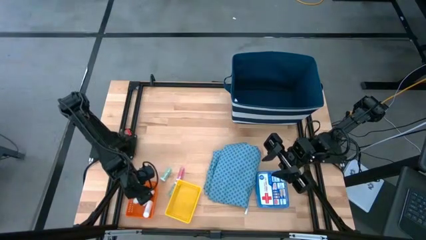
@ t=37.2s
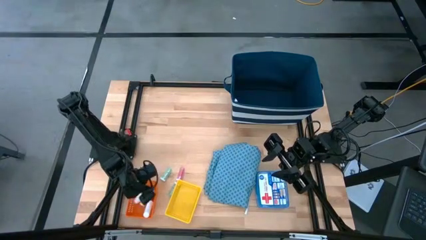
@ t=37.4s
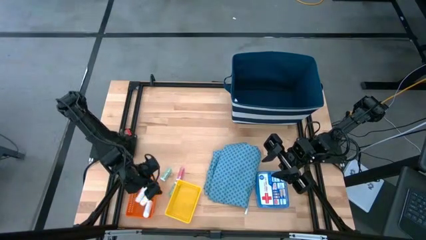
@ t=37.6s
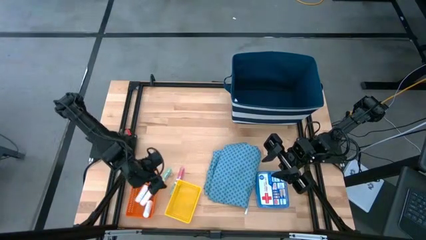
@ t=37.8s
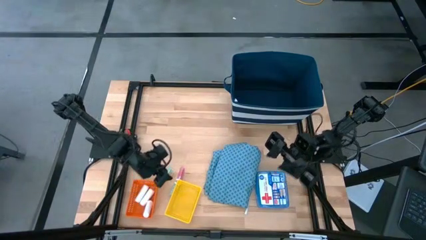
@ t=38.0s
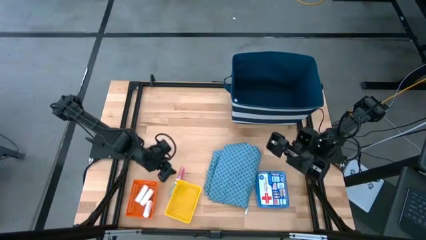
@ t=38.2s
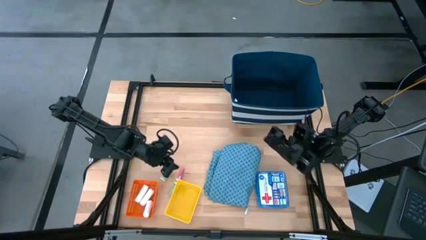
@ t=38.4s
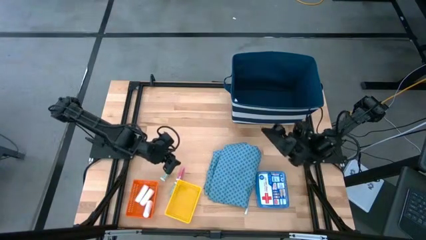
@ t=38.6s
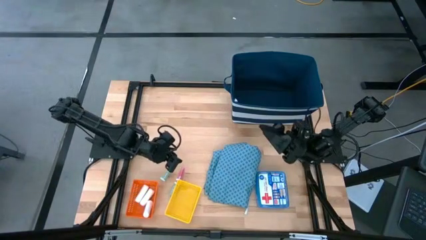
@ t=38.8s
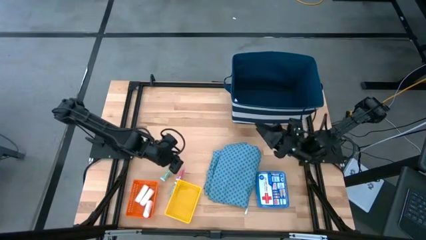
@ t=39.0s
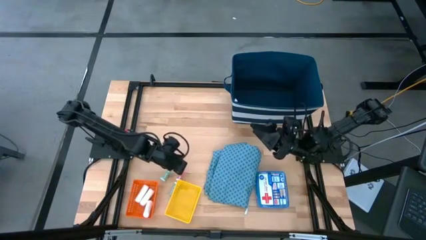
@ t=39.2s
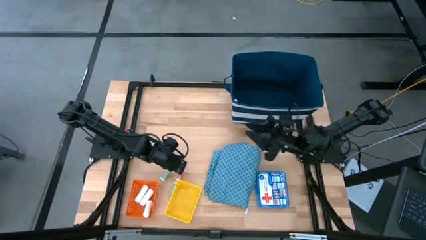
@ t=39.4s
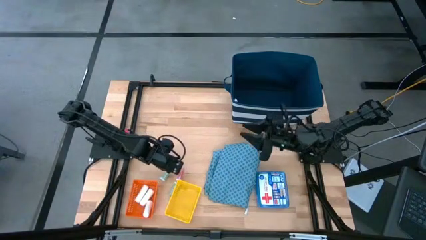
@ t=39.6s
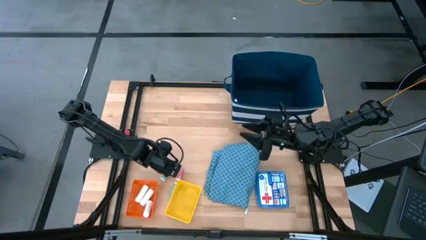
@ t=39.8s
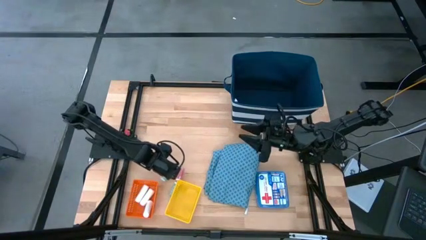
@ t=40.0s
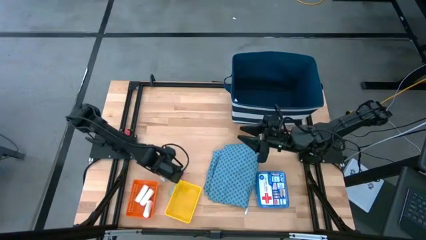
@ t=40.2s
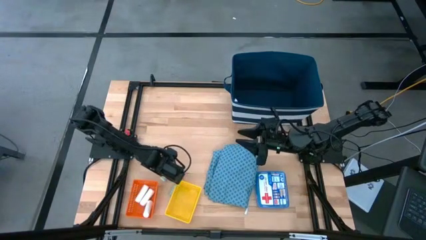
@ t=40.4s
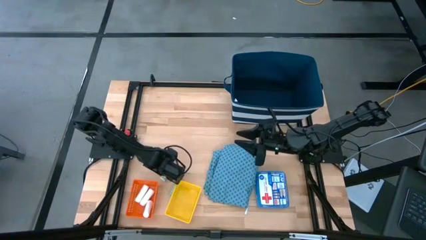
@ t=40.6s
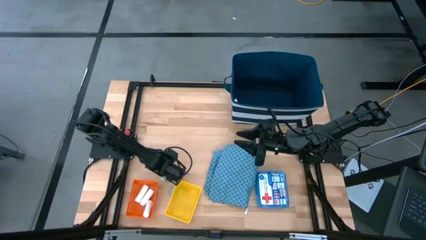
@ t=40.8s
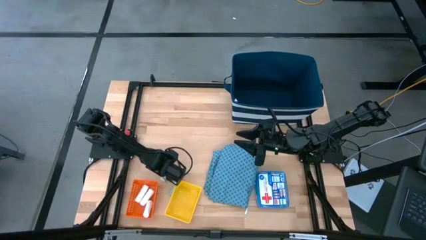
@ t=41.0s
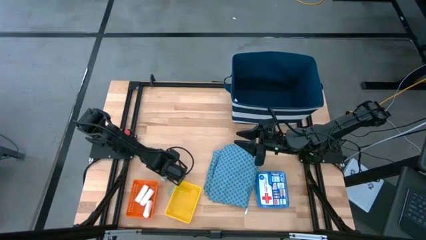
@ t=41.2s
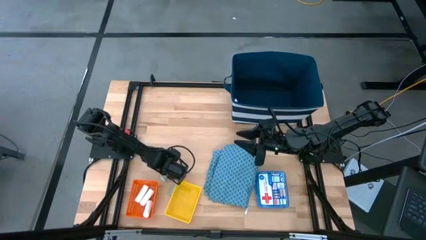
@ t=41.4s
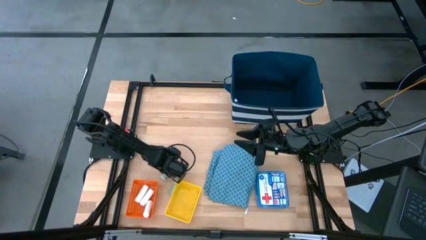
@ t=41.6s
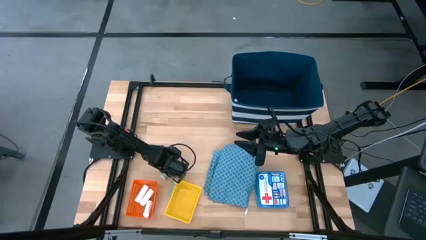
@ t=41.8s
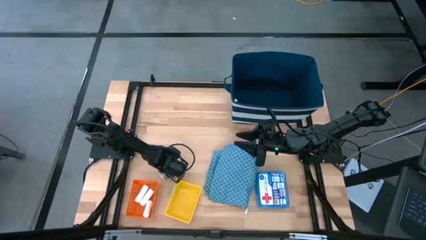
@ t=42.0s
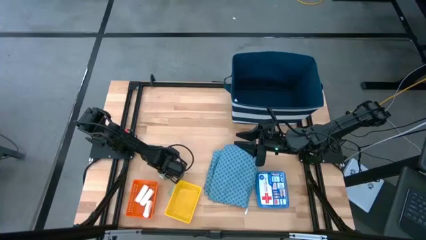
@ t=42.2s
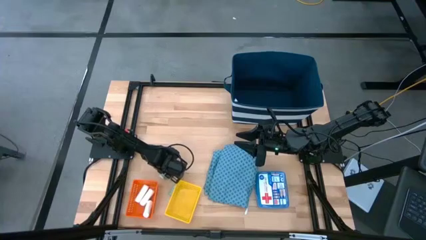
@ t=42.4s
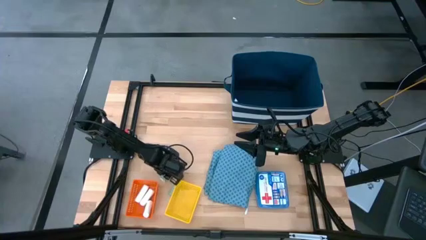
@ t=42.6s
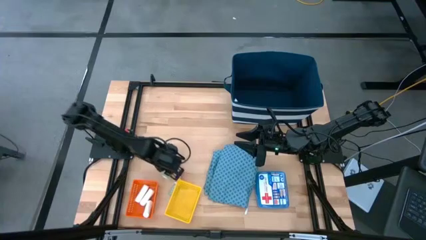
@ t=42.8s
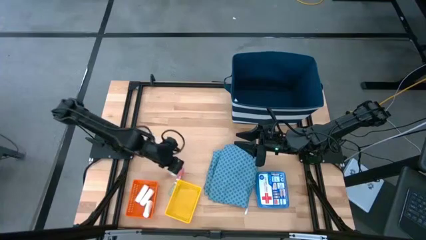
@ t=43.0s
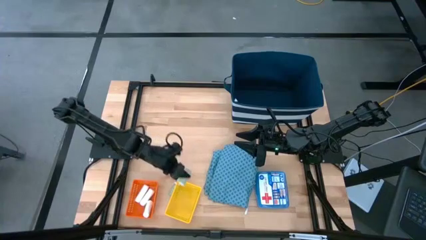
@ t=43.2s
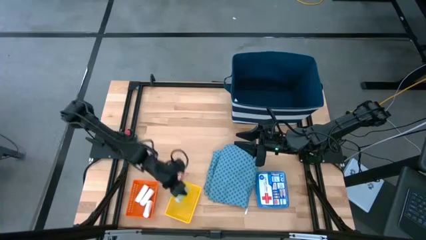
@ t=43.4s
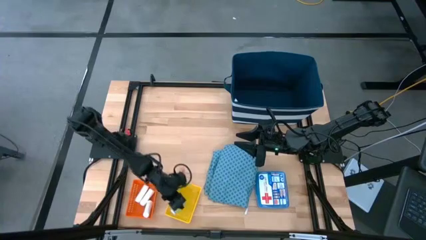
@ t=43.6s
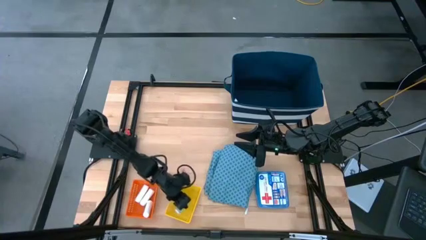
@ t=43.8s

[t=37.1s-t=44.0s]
Task: Pick & Place Medicine items
Put the left green medicine bottle into the yellow bin

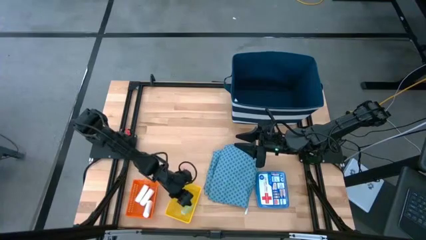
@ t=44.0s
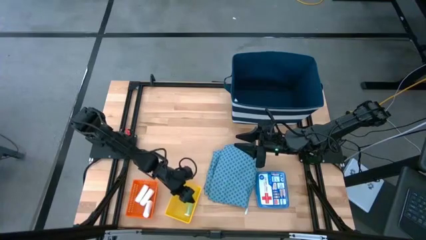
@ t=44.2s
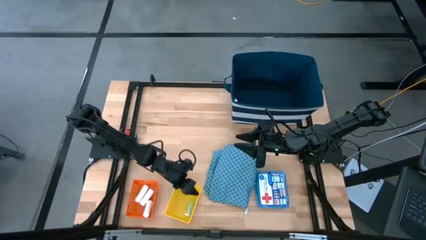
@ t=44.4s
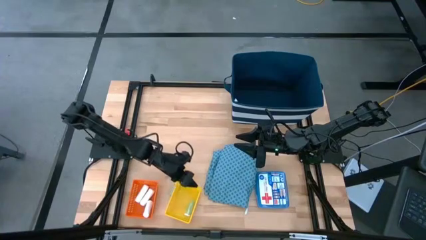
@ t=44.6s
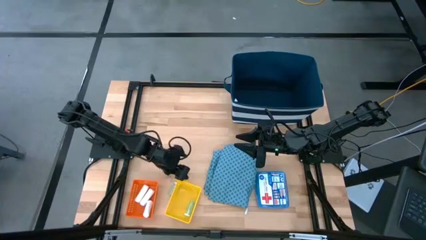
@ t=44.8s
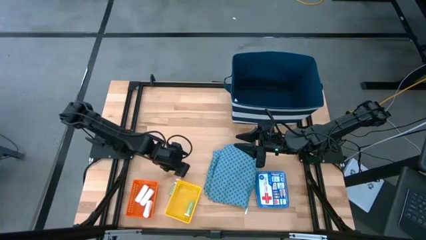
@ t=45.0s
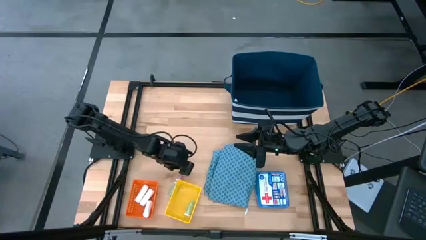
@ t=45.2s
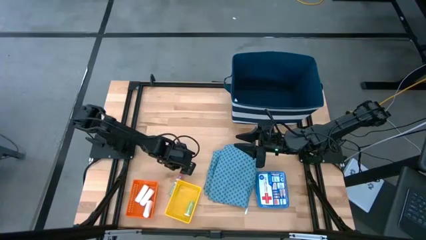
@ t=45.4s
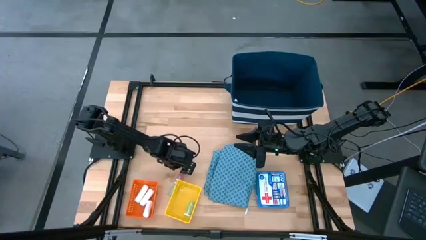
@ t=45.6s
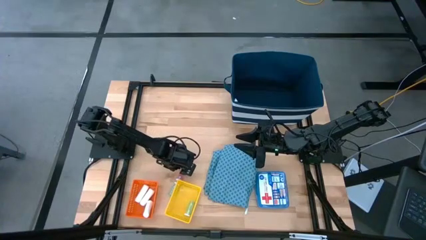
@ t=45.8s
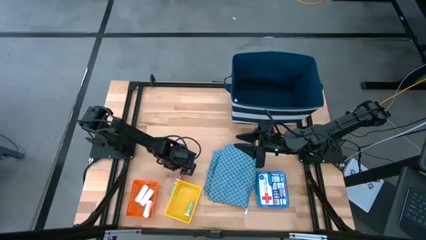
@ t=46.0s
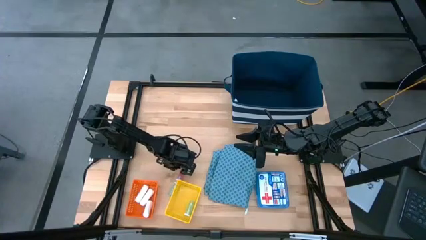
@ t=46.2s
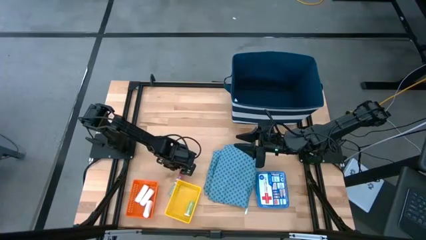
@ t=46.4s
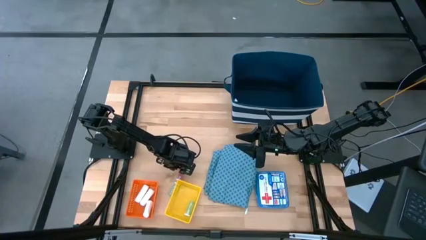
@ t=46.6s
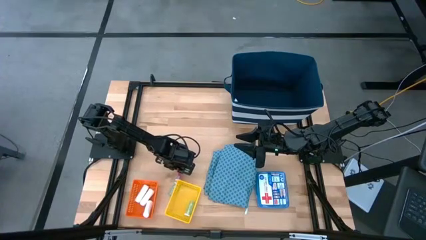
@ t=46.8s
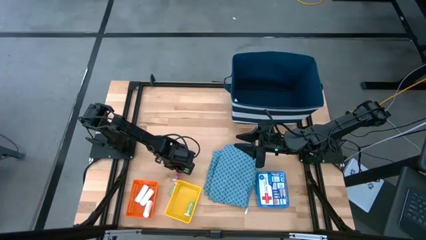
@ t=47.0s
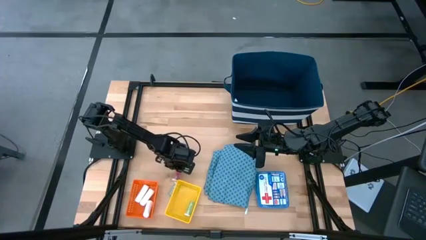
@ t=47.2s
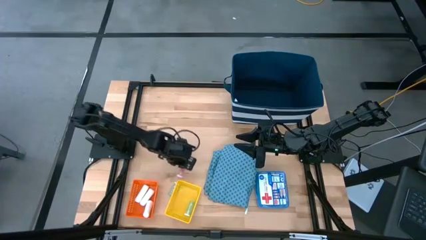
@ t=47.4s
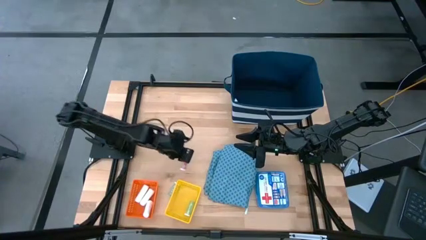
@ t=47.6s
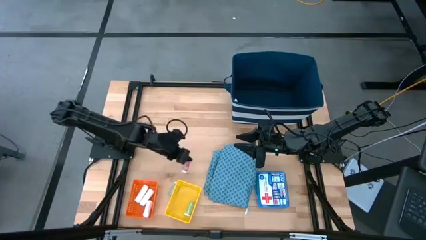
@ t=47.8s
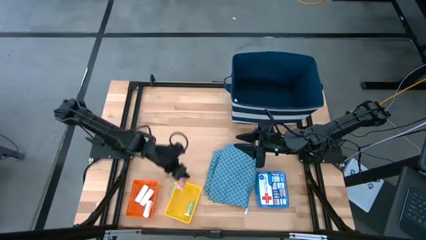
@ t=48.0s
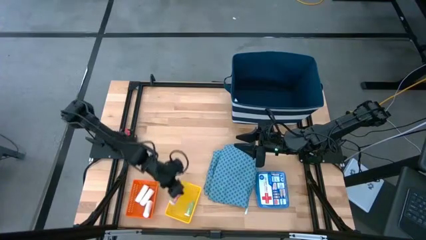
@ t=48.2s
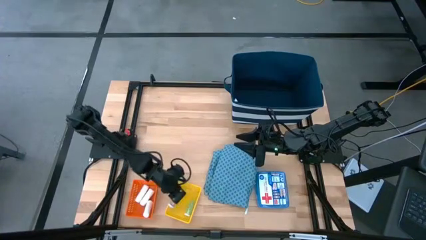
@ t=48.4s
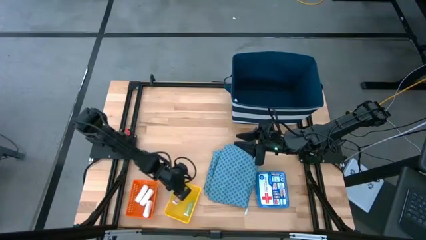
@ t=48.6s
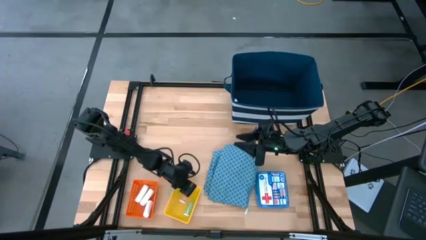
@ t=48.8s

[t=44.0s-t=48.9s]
Put the red medicine bottle into the yellow bin

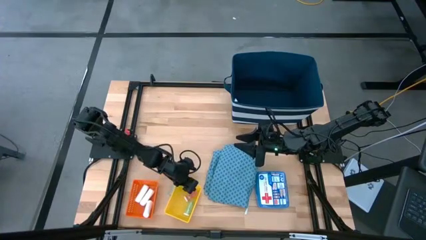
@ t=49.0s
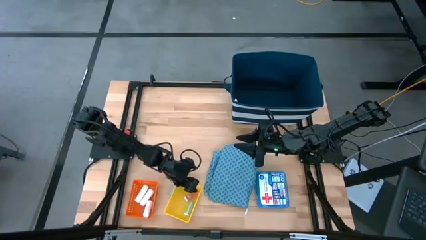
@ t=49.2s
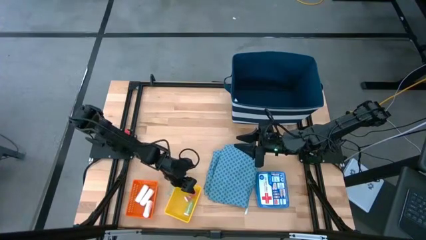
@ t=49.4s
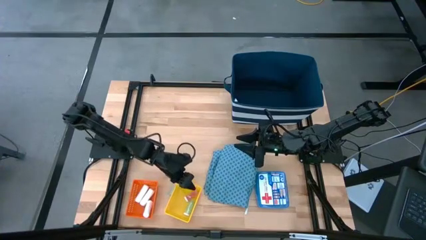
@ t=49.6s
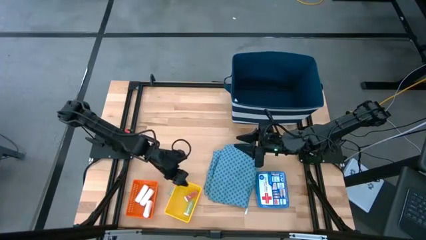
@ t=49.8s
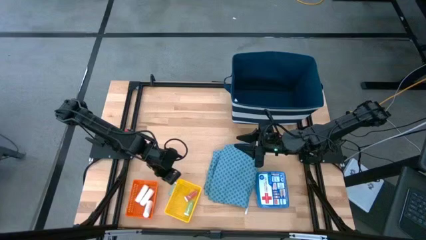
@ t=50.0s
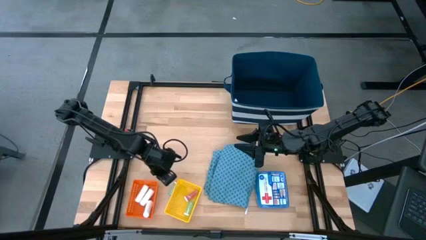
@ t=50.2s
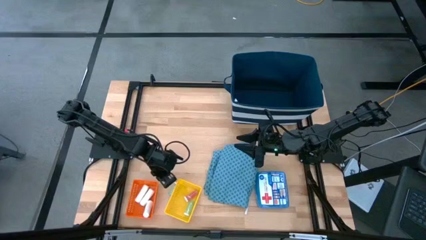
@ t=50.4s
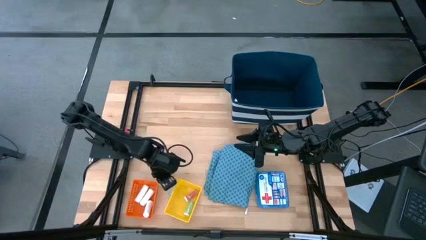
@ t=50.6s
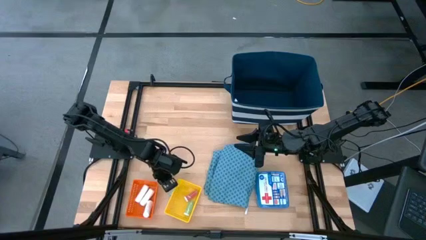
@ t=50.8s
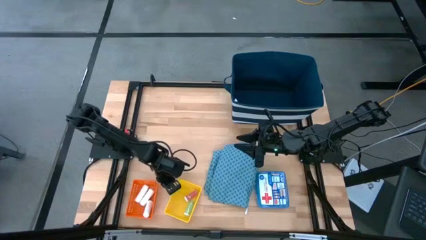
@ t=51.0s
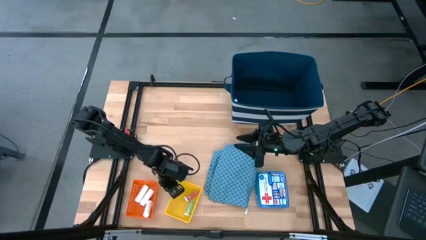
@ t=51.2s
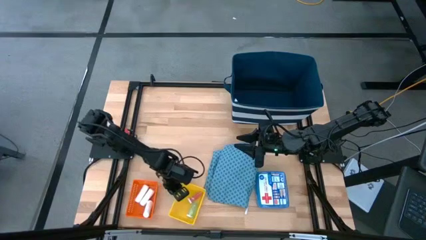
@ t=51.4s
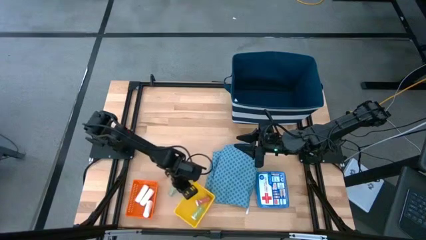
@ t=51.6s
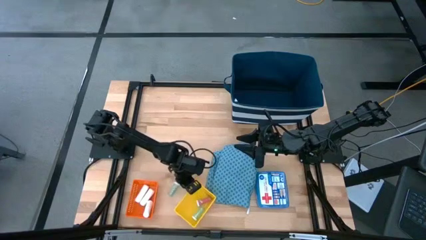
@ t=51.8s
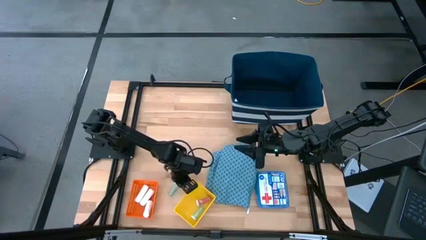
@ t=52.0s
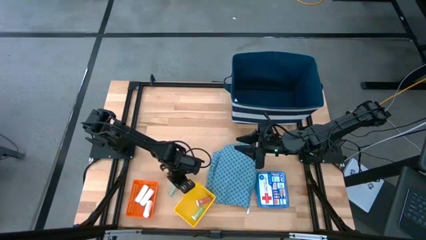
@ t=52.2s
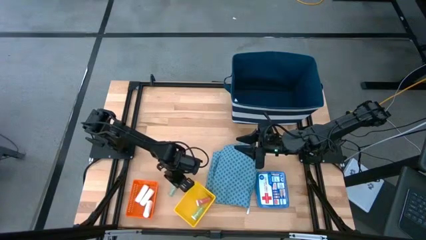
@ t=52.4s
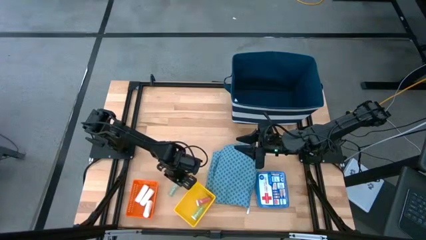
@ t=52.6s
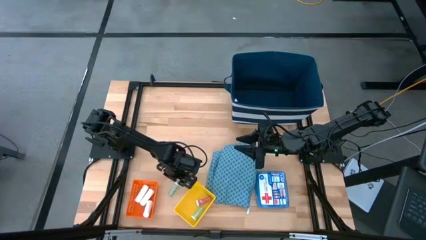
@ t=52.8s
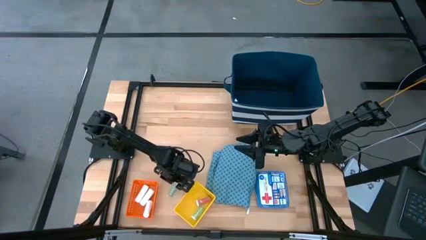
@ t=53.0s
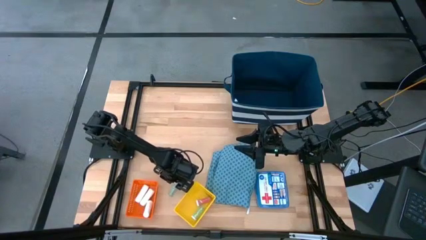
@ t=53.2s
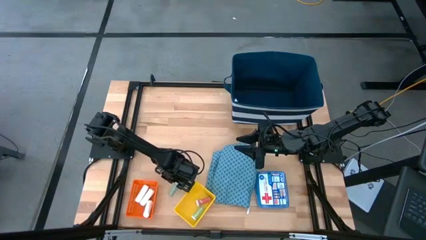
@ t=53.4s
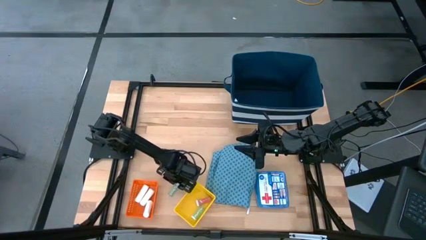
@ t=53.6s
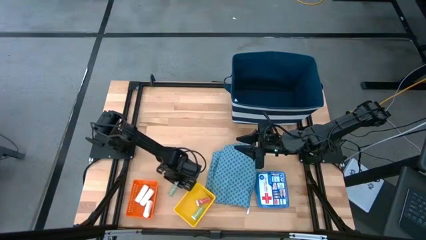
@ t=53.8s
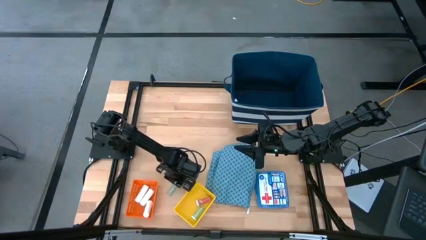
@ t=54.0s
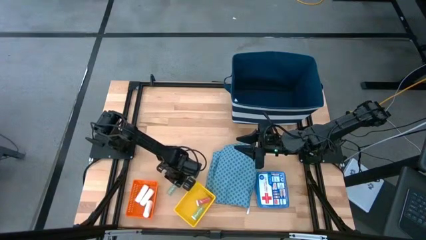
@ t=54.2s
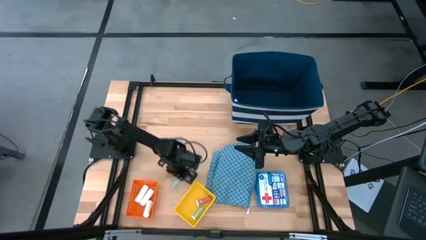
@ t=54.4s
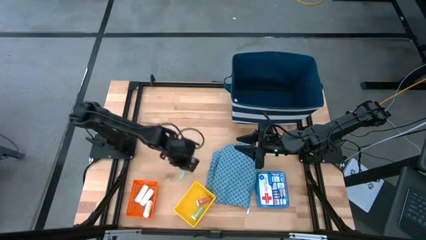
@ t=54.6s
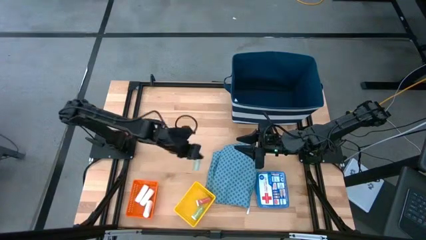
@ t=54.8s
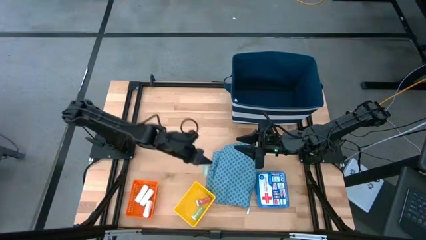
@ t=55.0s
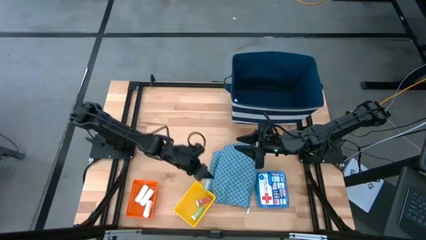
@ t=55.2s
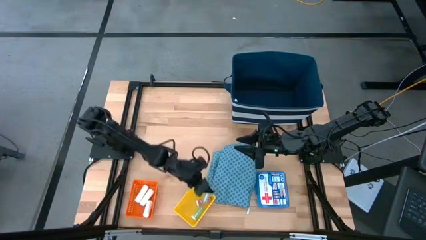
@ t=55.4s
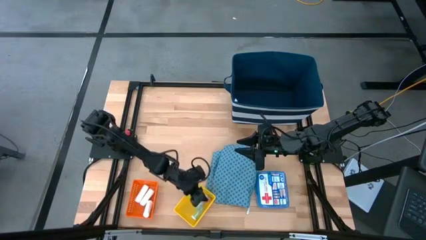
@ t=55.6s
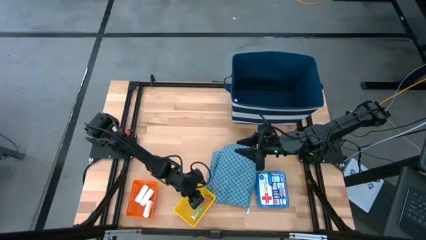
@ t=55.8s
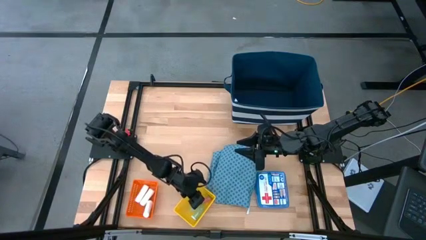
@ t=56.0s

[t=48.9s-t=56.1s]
Put the green medicine bottle into the yellow bin
